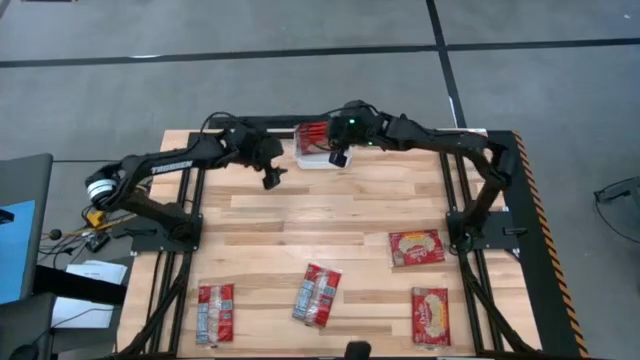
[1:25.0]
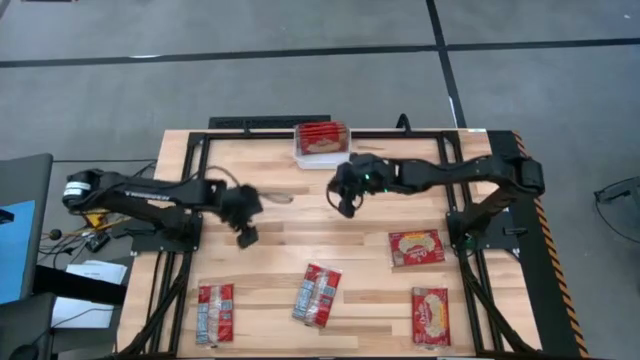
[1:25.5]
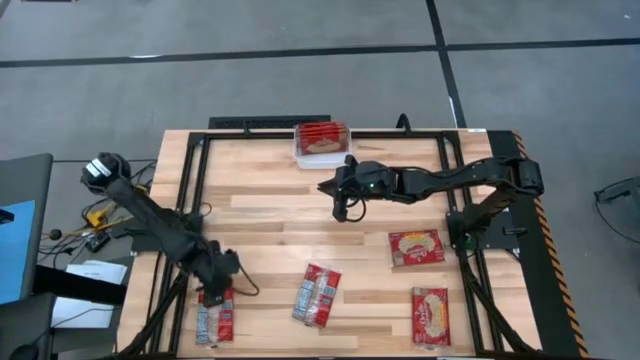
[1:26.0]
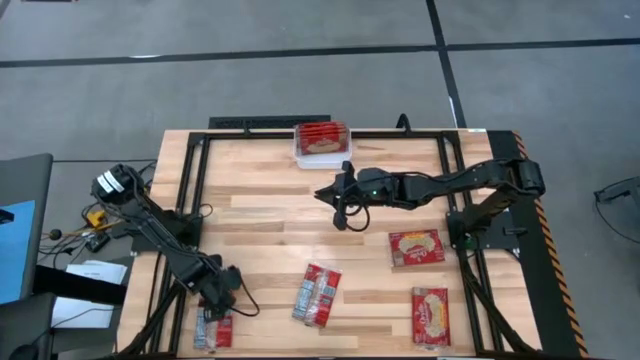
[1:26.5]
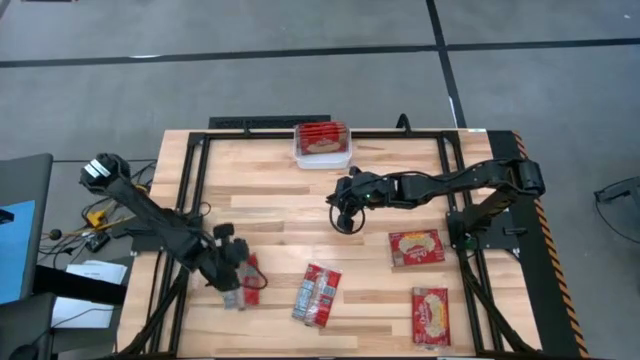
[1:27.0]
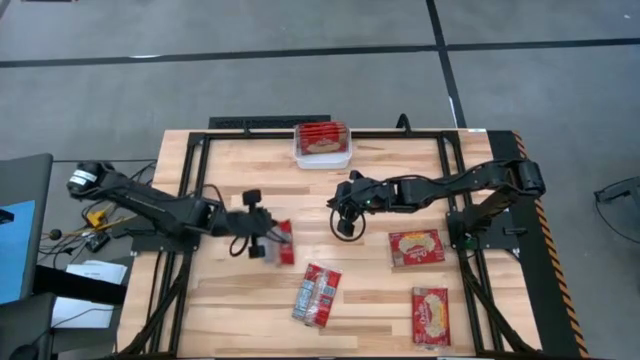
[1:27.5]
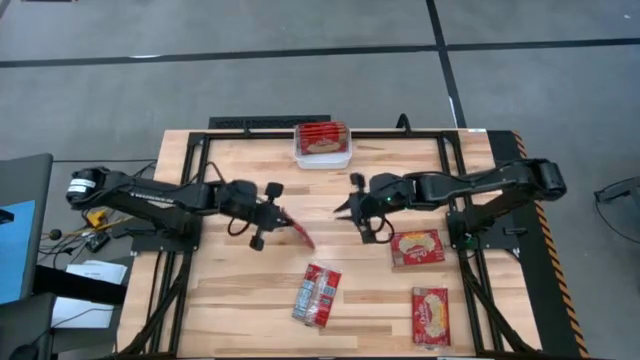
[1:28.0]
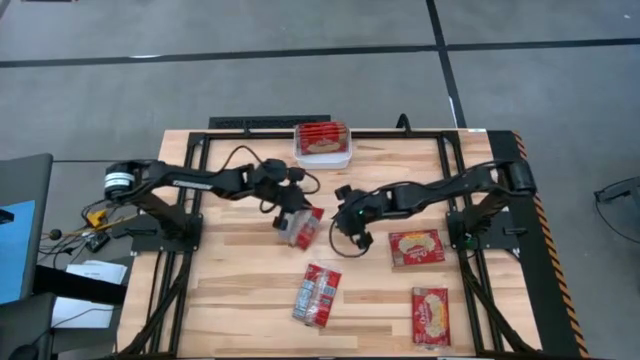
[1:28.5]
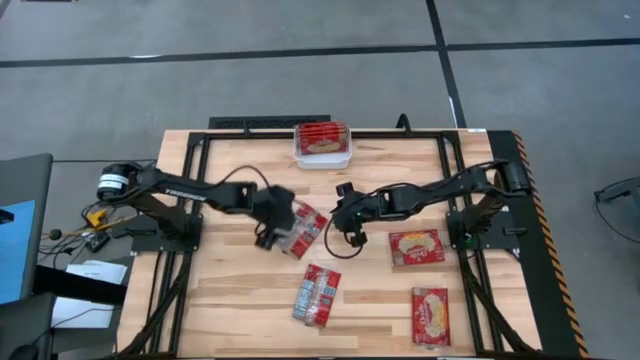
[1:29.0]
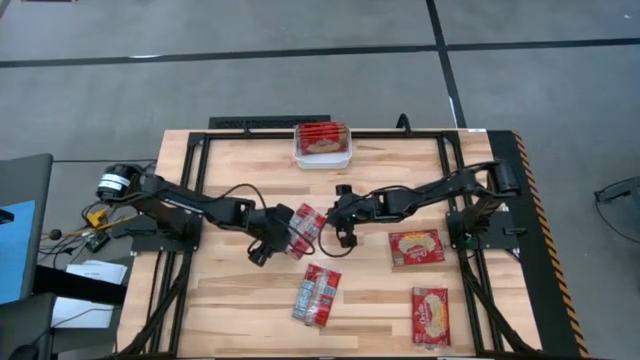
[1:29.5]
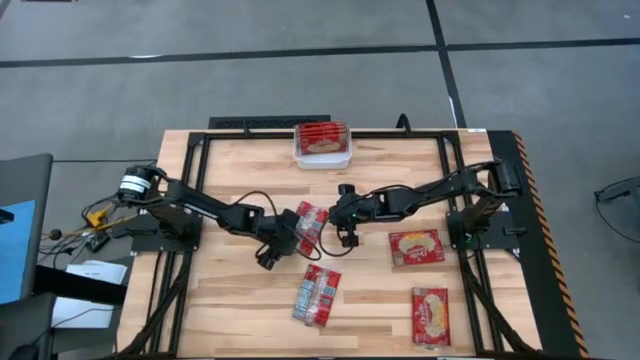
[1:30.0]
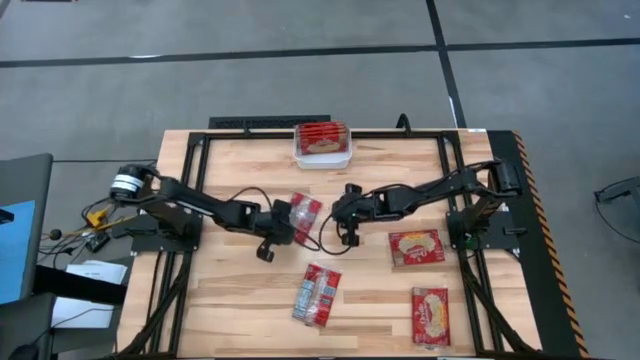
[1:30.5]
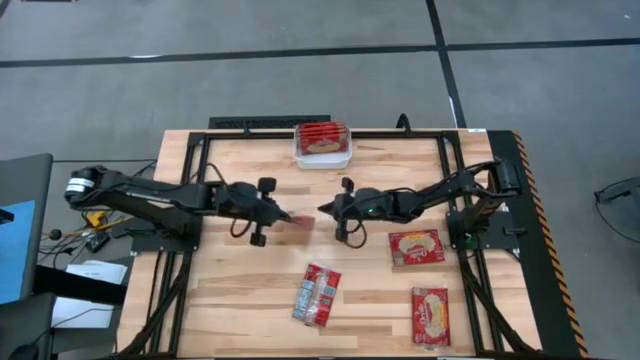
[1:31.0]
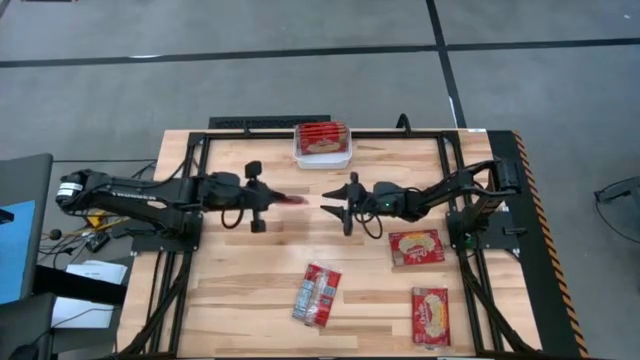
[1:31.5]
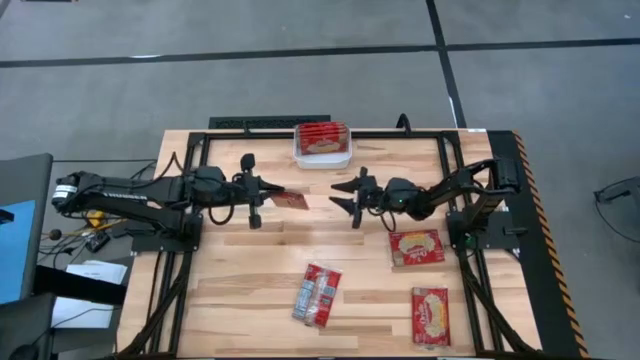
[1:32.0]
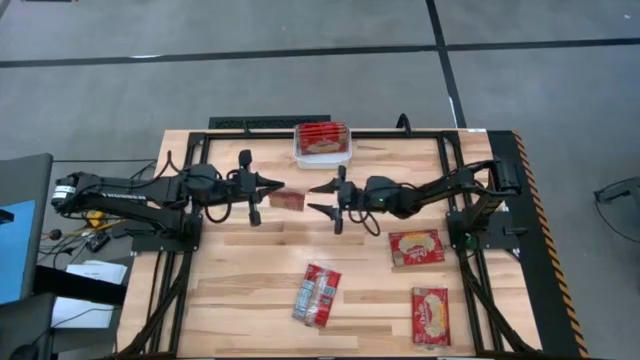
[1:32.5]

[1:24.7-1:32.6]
Task: Sort popcorn bags into baskets
Put the red popcorn bag into the white bin

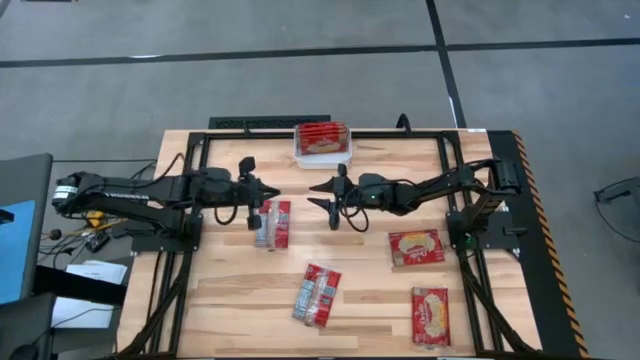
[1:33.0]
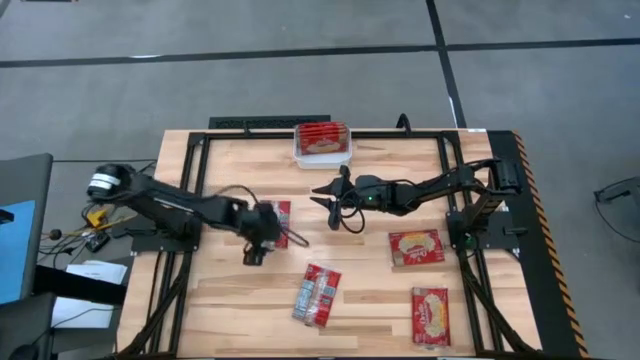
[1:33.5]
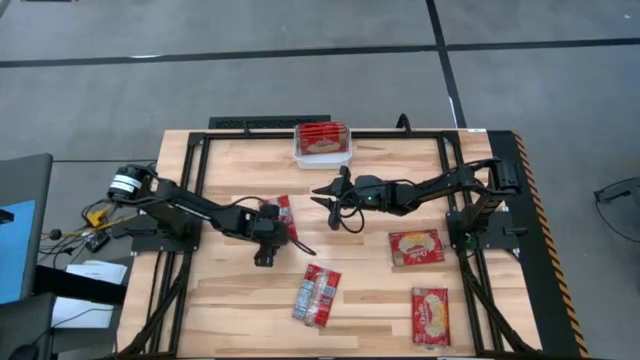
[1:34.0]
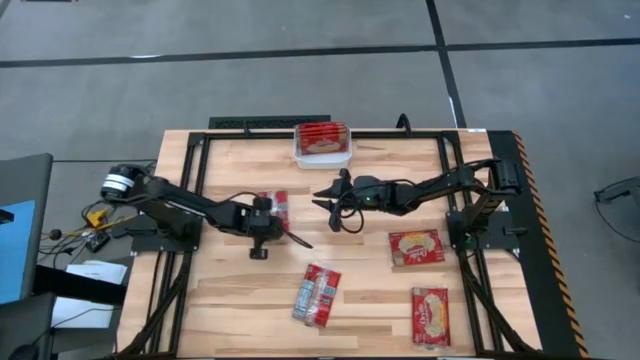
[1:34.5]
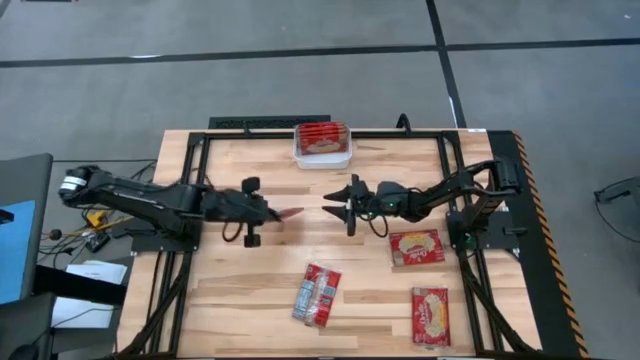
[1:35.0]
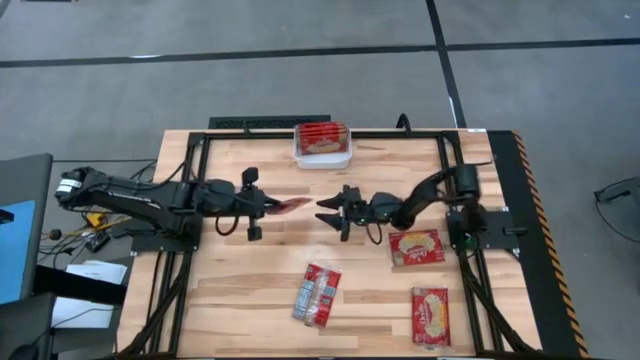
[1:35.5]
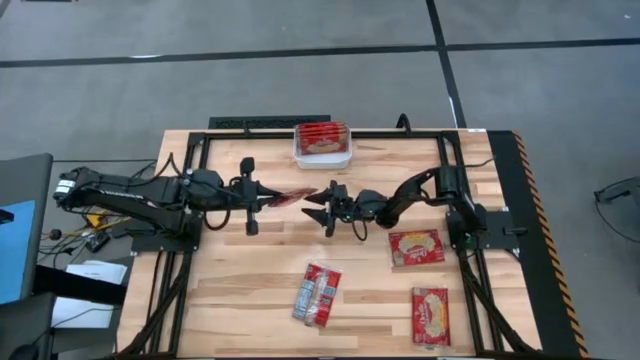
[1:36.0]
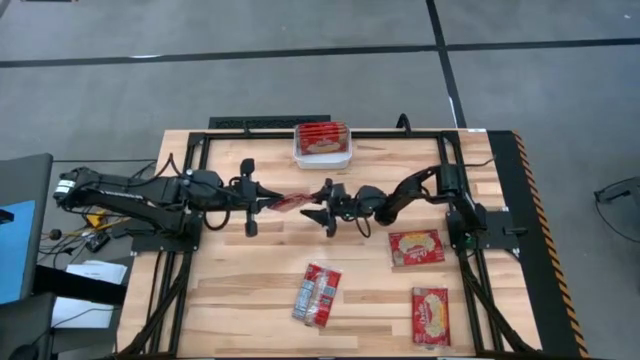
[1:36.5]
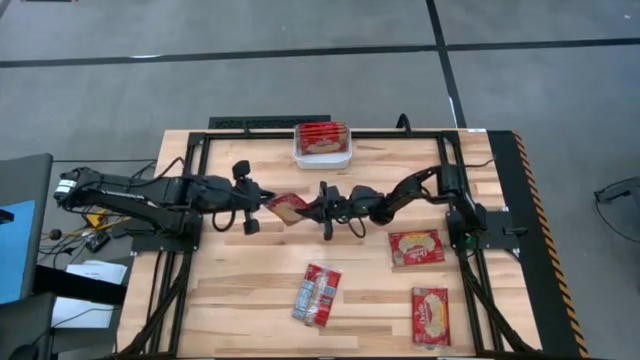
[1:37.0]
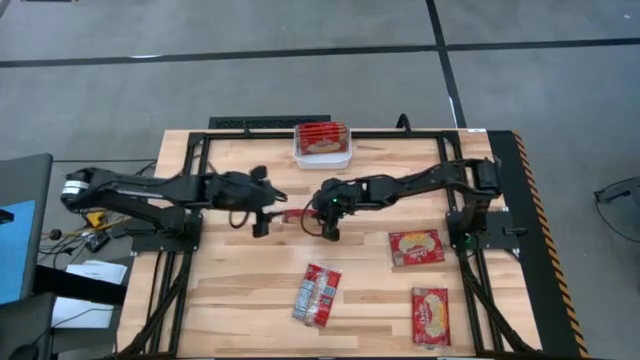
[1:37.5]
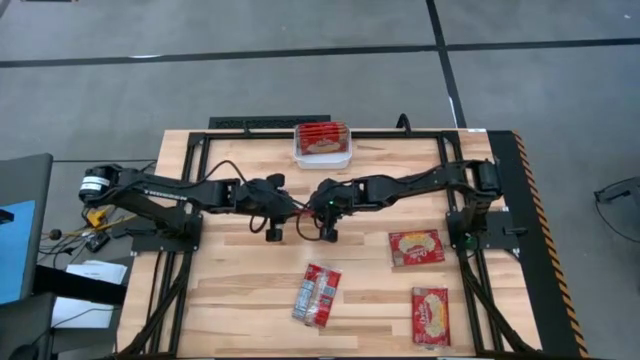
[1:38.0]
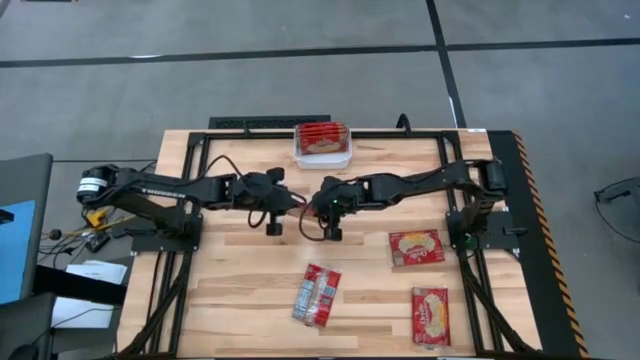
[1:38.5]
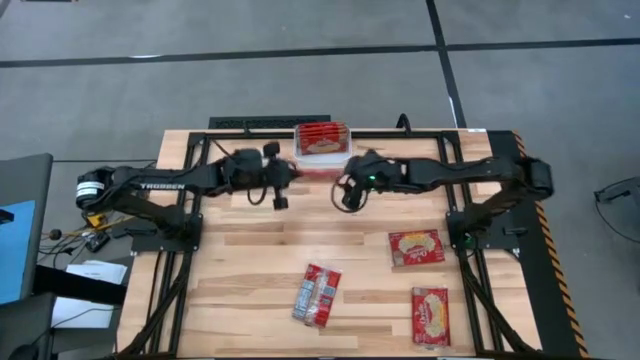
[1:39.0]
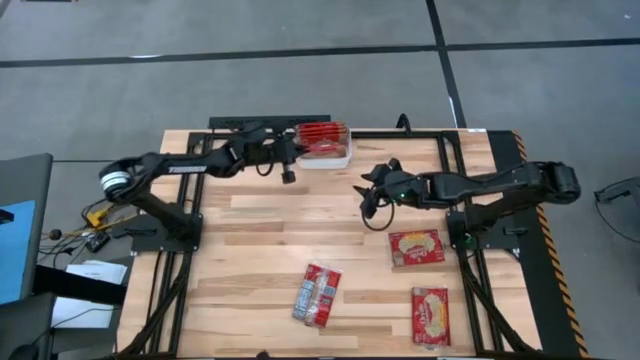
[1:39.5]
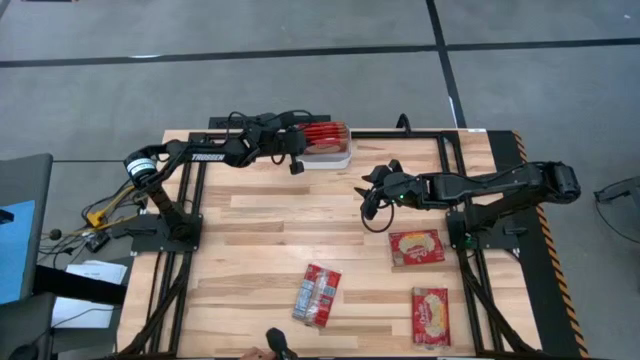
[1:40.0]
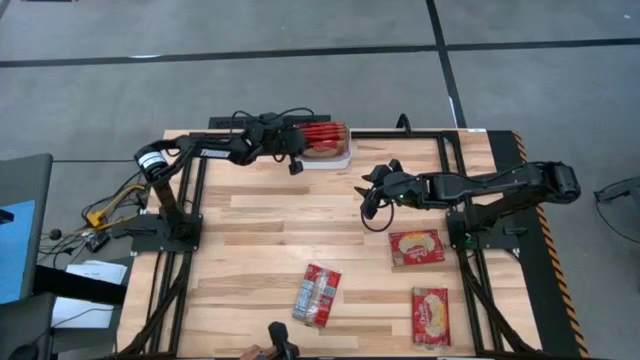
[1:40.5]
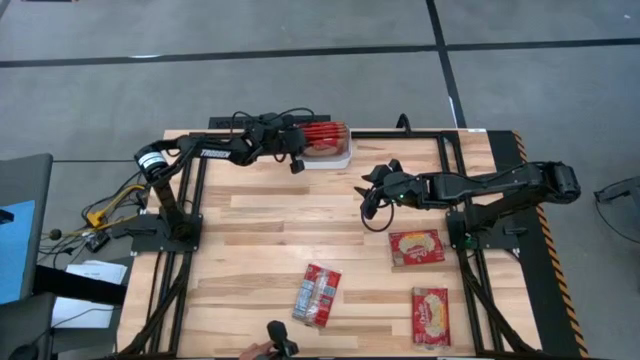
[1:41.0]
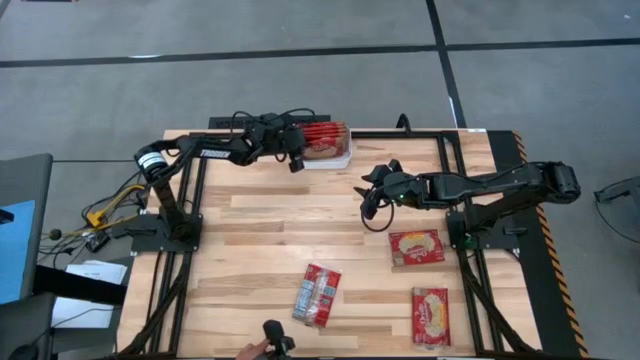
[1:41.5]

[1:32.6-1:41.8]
Put the red popcorn bag into the white bin

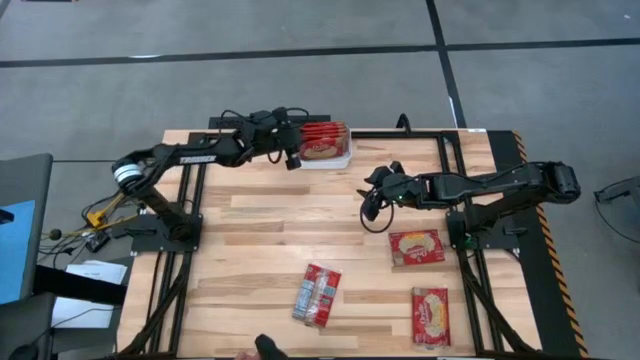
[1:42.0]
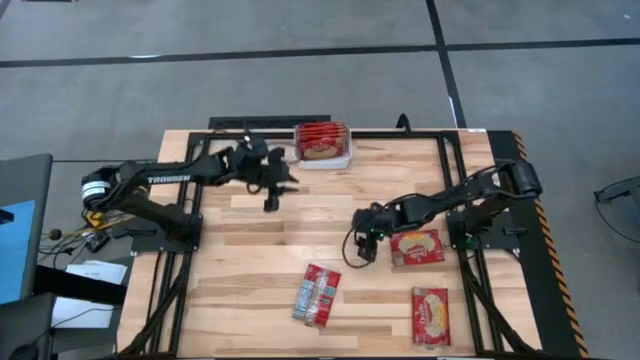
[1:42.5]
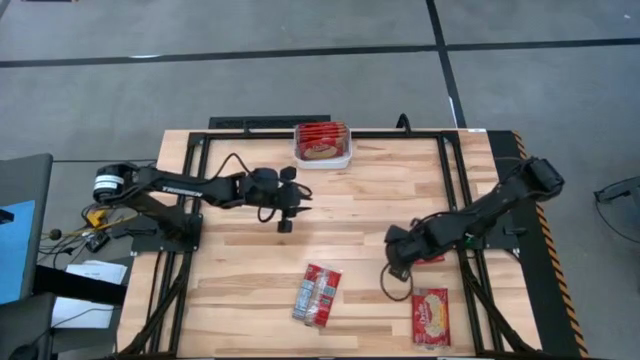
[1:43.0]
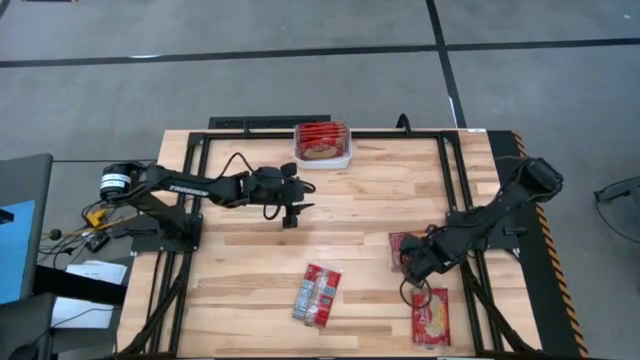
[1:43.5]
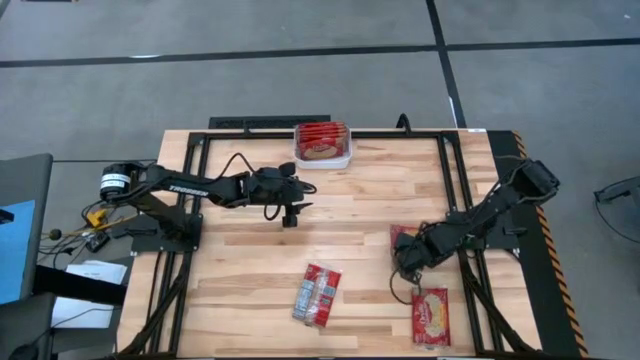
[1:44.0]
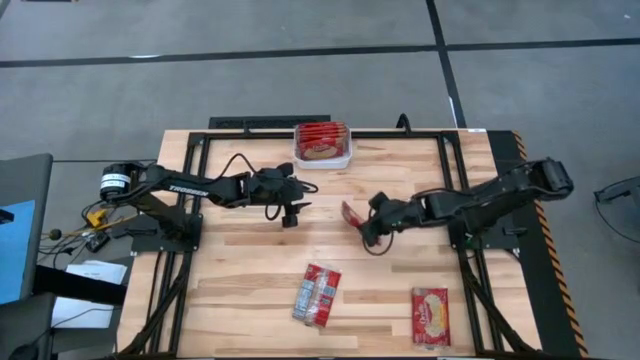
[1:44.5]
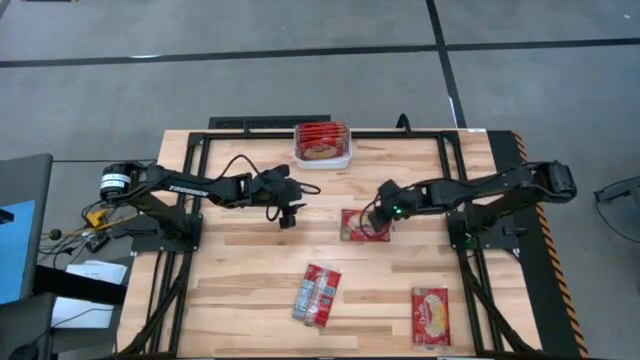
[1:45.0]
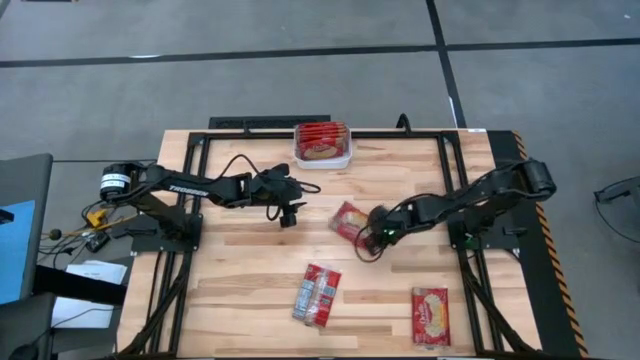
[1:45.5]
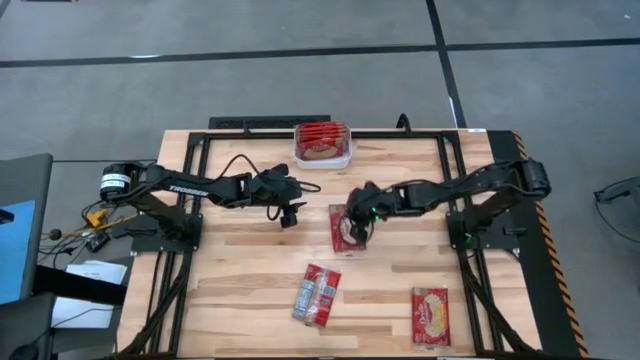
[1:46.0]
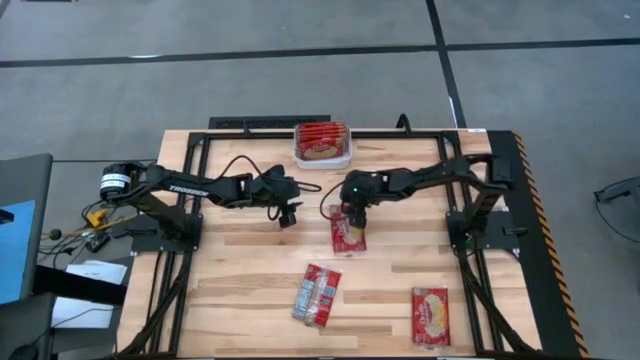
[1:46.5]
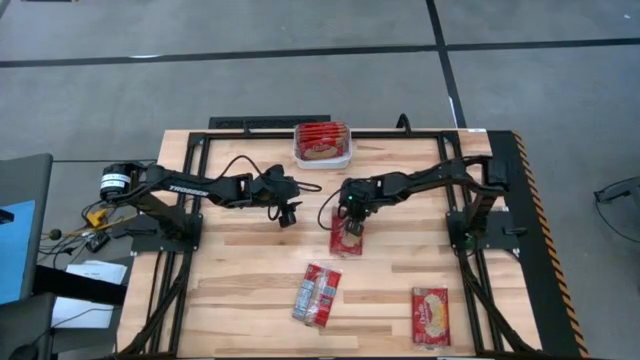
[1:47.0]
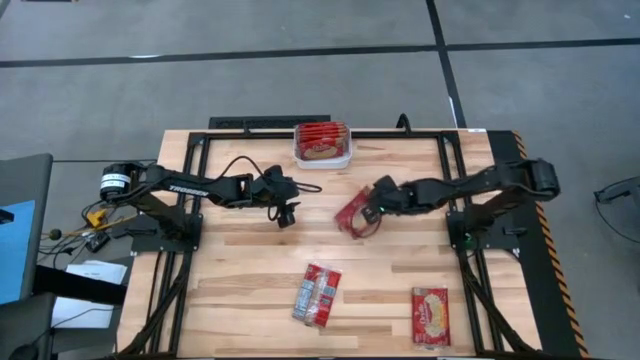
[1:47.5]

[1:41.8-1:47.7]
Put the red popcorn bag into the white bin
